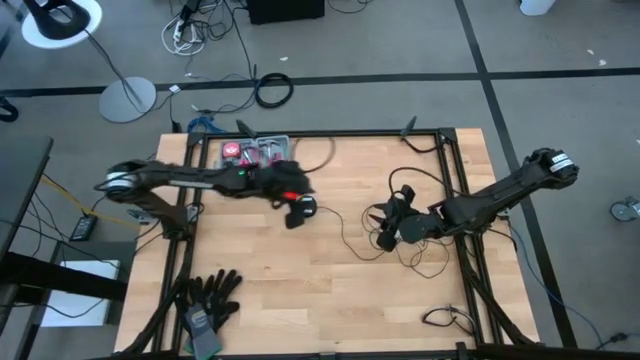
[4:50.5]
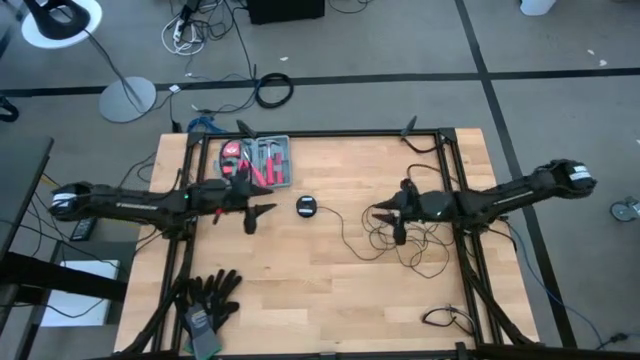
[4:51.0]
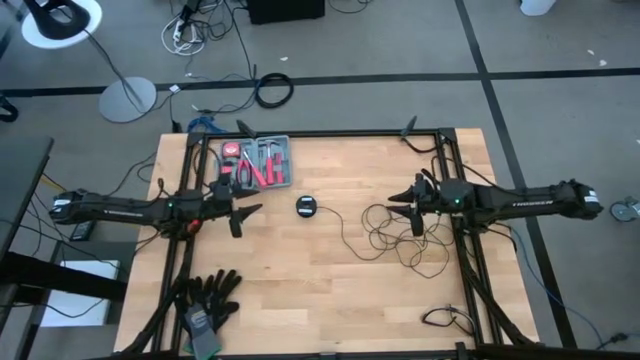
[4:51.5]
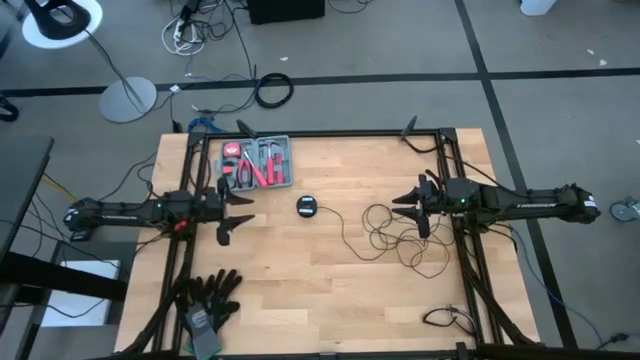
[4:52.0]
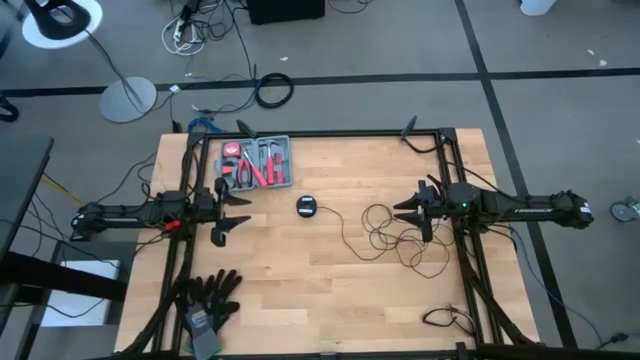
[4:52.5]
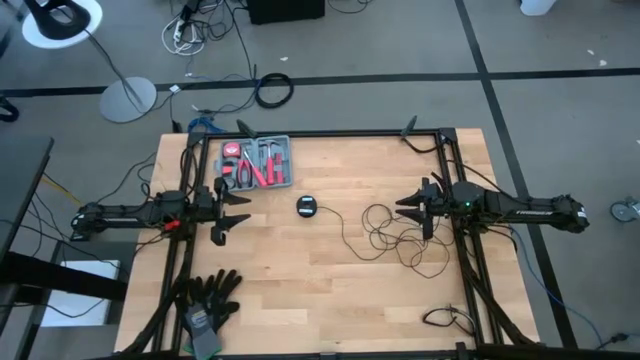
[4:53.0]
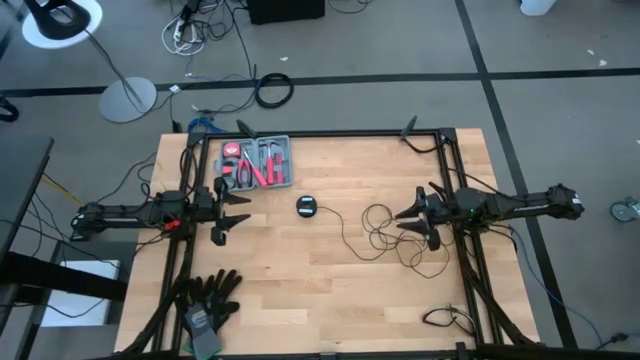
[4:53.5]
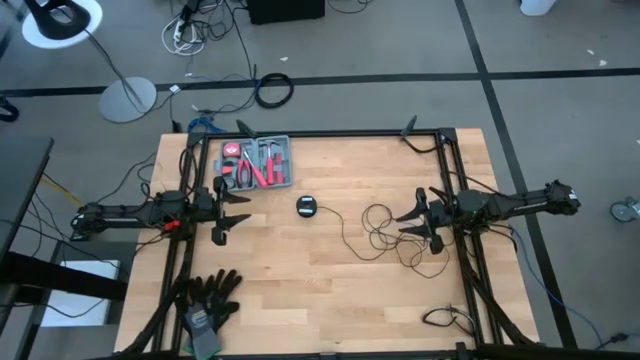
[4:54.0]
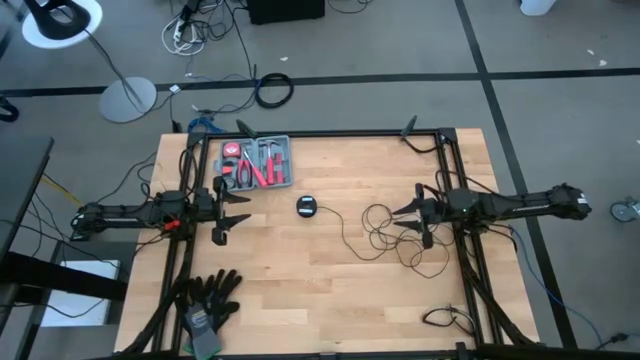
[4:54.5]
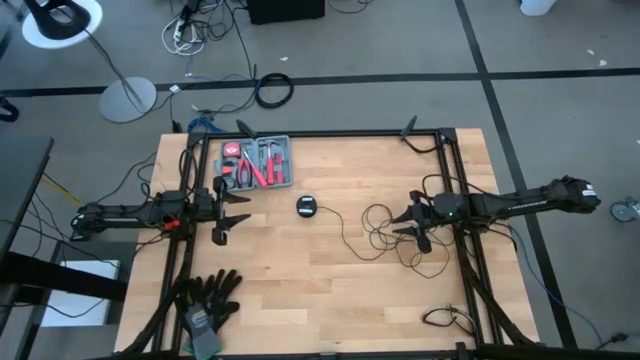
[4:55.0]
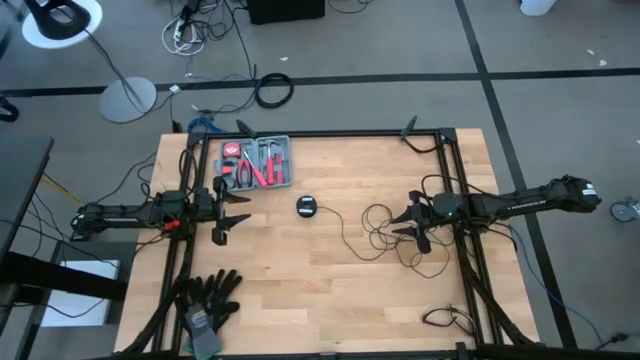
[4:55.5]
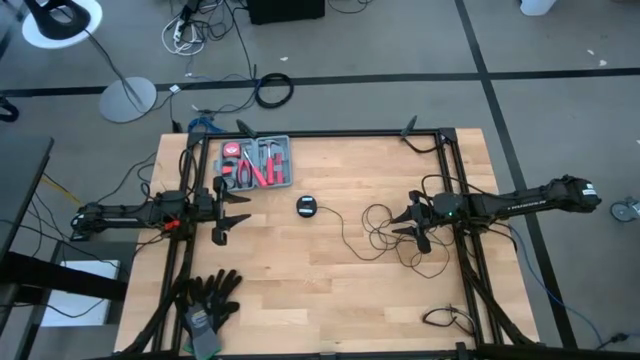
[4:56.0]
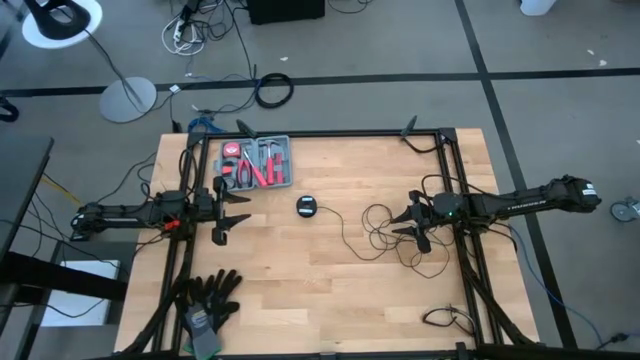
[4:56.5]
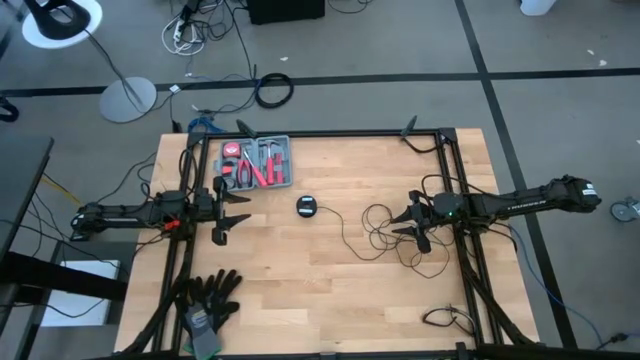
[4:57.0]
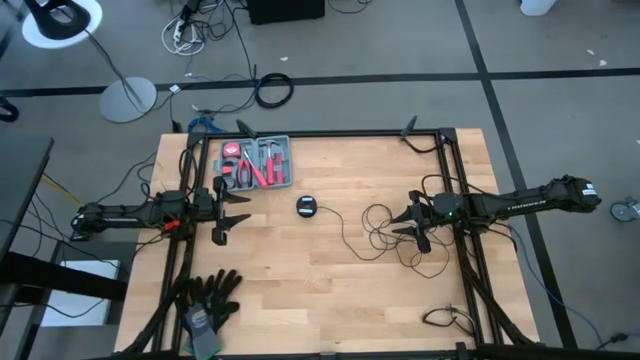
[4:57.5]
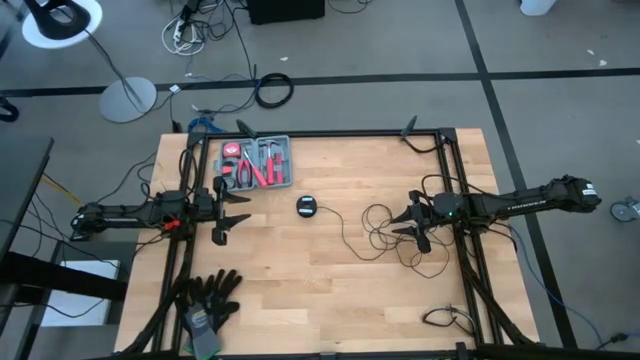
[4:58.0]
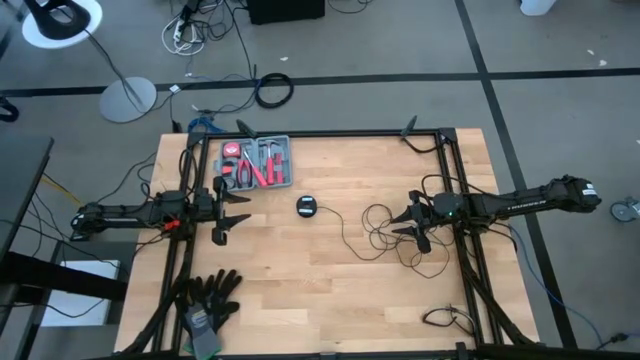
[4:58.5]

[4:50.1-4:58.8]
Task: Coil cords
Return to Home Position

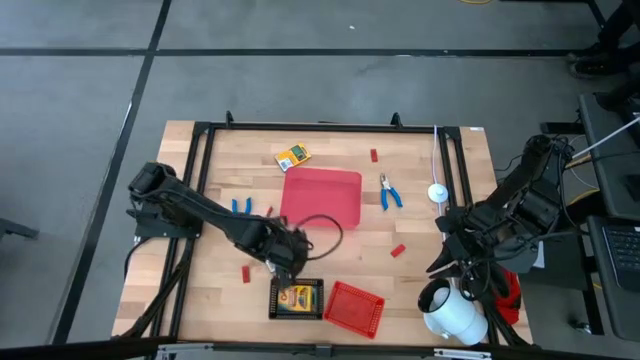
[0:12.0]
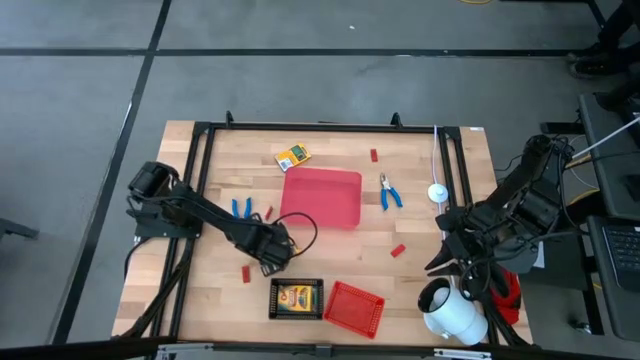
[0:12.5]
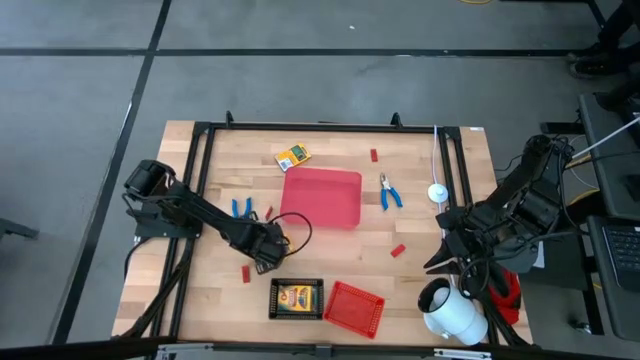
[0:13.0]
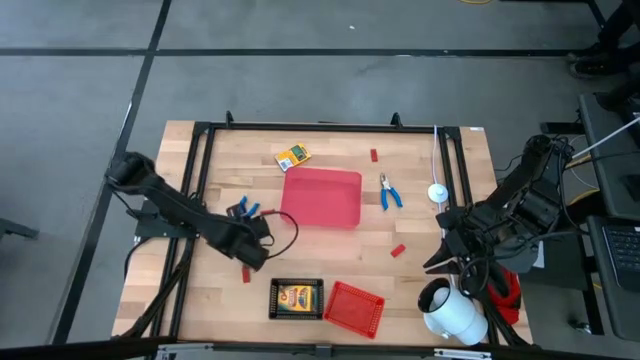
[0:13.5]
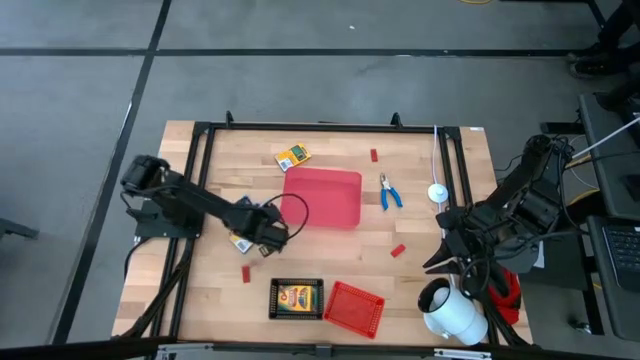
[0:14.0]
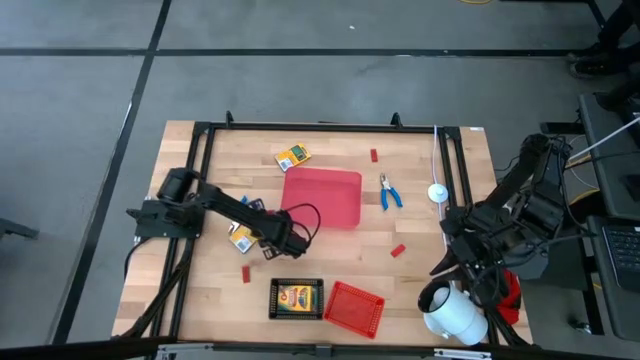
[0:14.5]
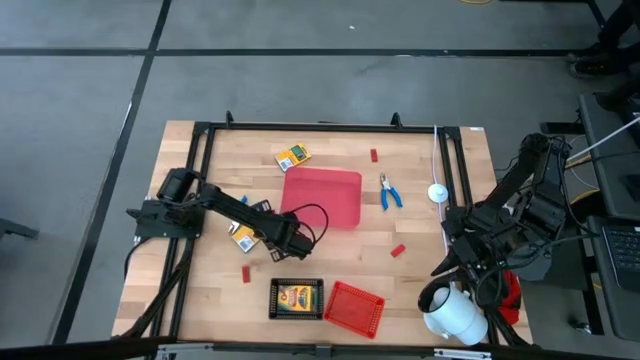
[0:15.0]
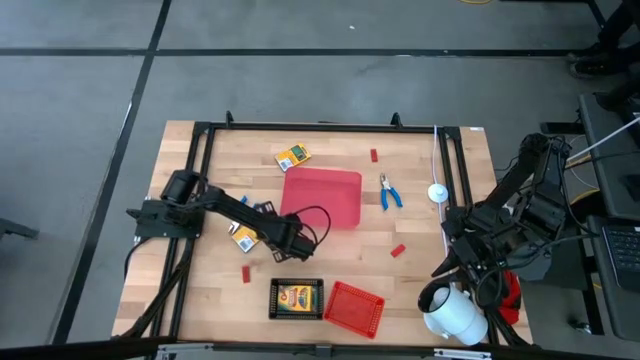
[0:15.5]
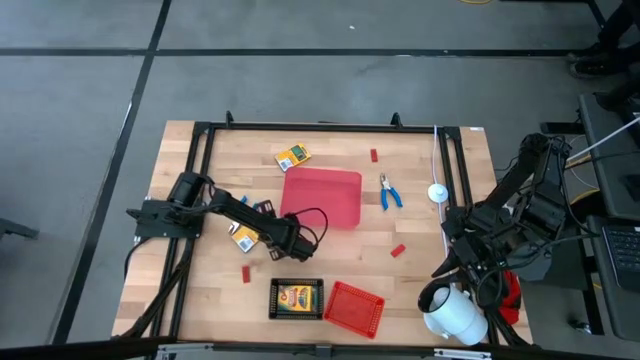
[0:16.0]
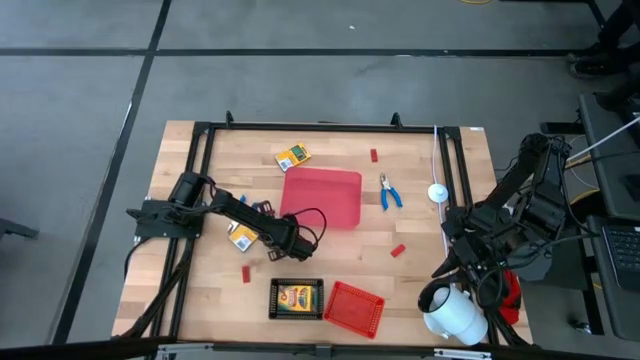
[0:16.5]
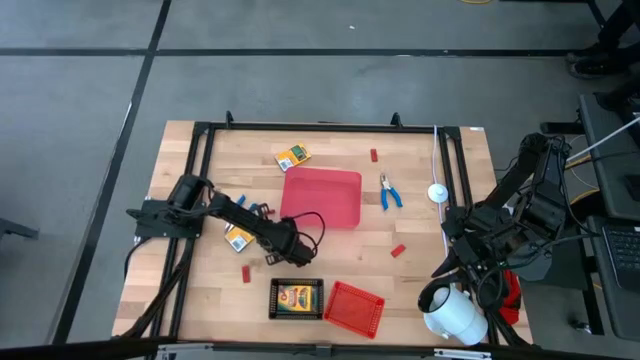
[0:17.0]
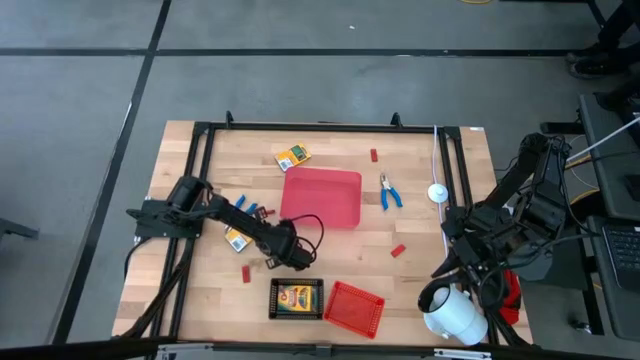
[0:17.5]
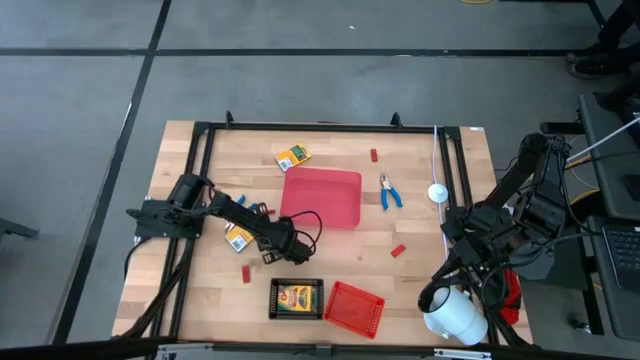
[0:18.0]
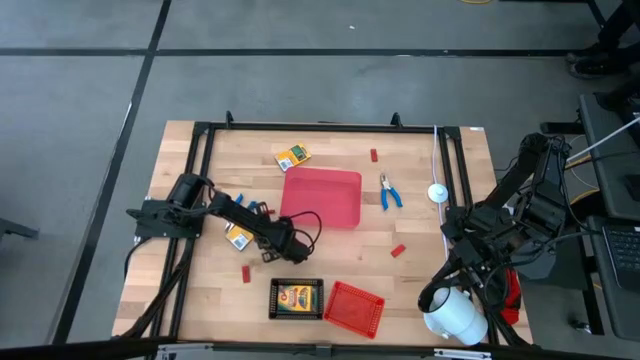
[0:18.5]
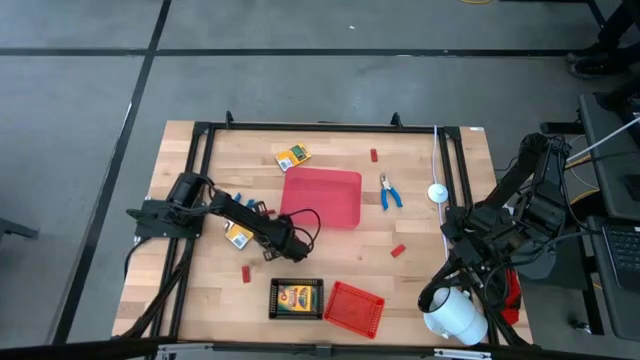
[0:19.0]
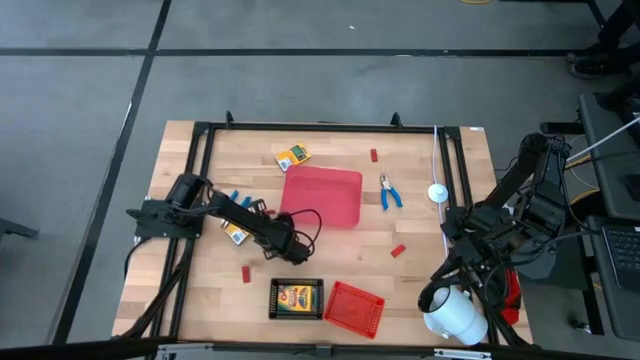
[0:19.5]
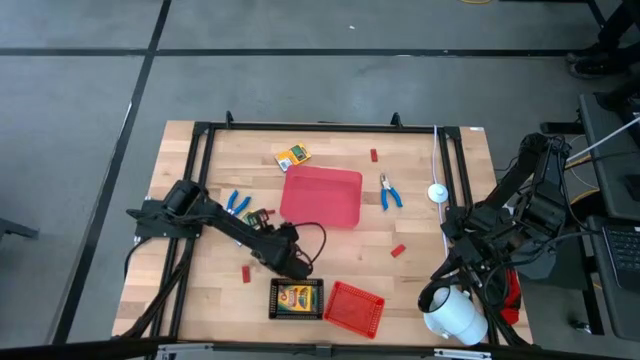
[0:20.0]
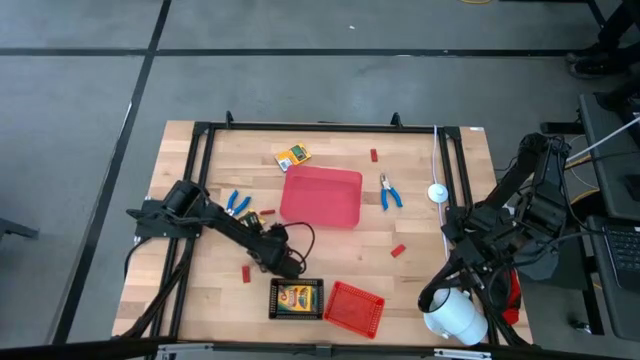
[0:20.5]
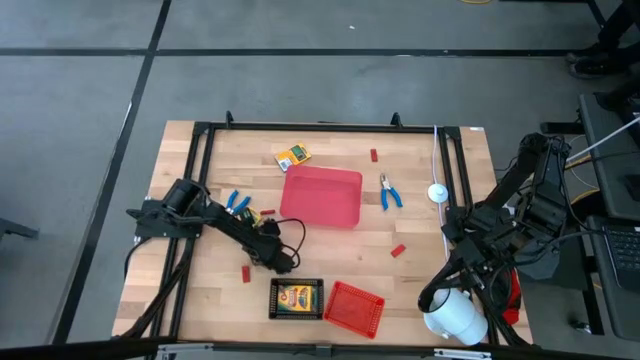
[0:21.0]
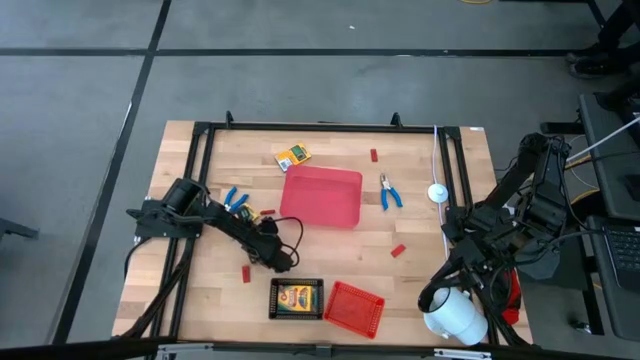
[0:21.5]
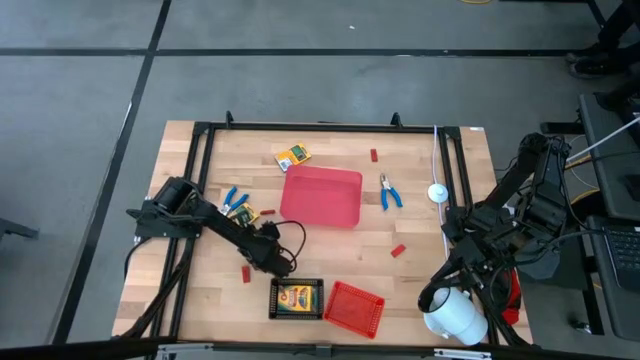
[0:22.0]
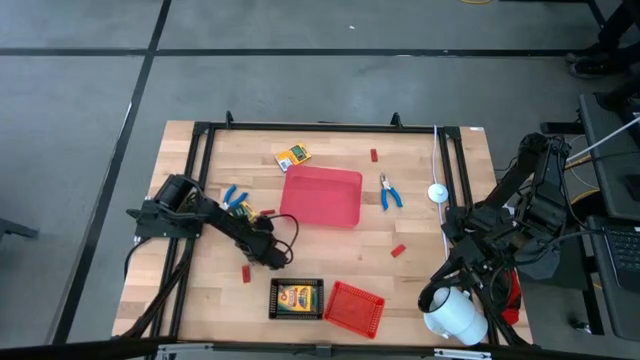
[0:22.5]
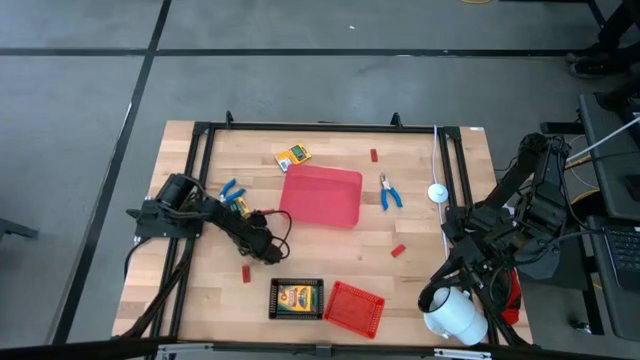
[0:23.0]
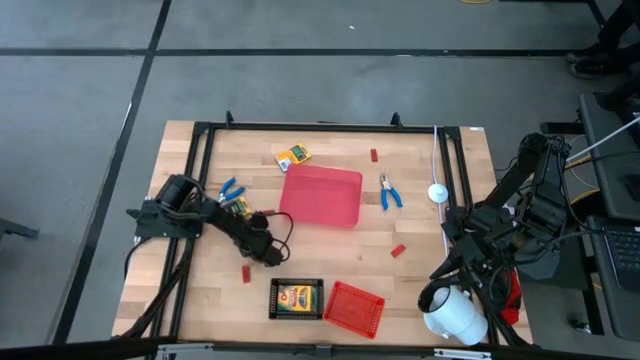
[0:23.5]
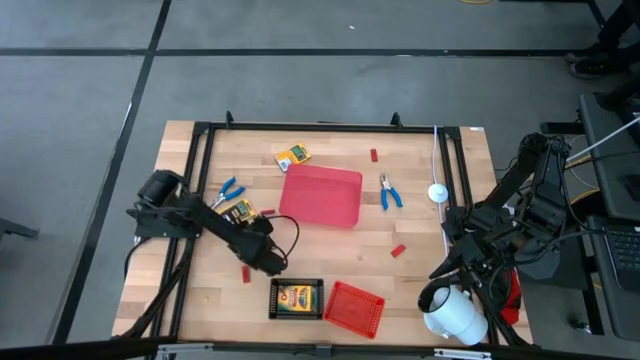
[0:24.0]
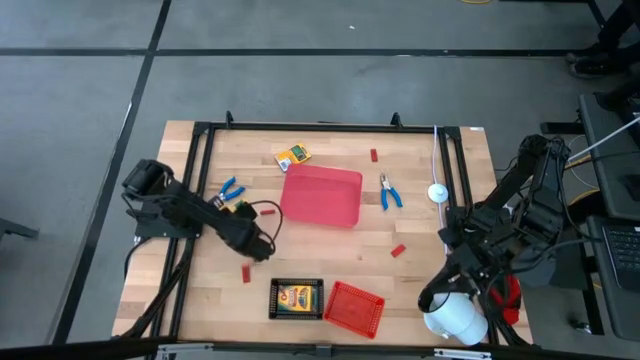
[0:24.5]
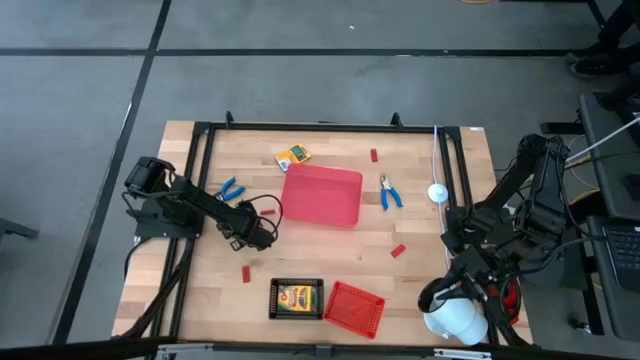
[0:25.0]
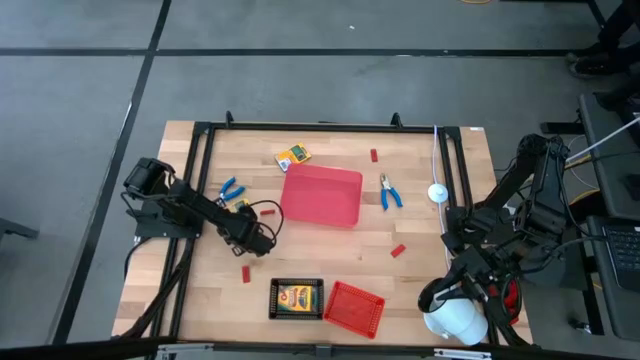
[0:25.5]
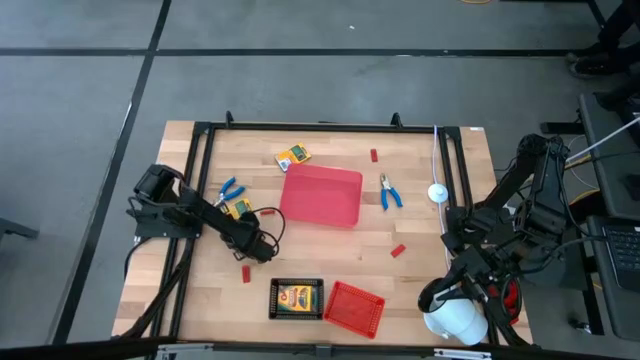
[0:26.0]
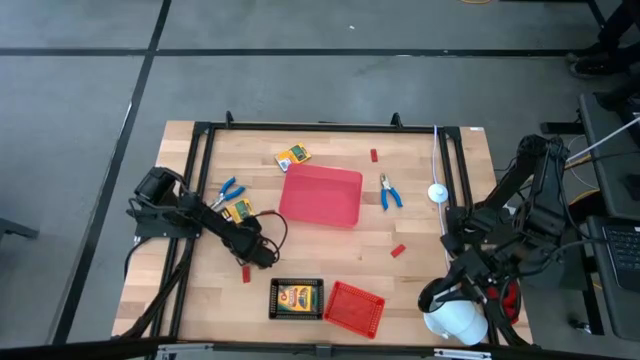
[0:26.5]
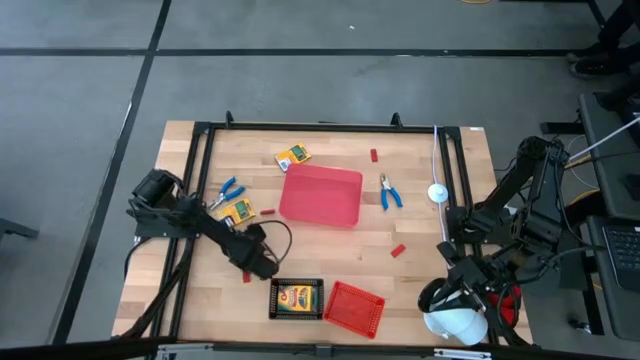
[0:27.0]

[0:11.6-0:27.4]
Task: Pick & Place School Supplies
Put the crayon box into the black bin
